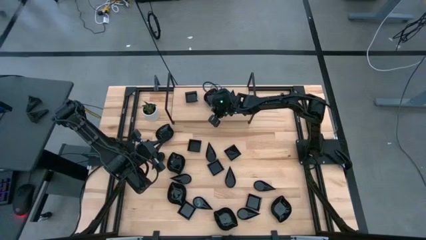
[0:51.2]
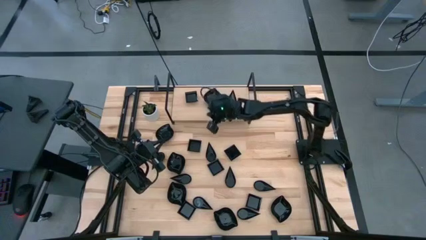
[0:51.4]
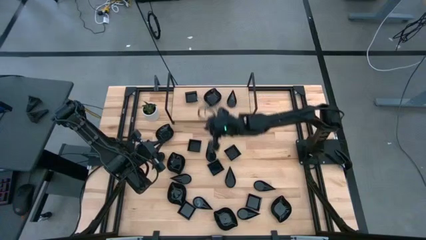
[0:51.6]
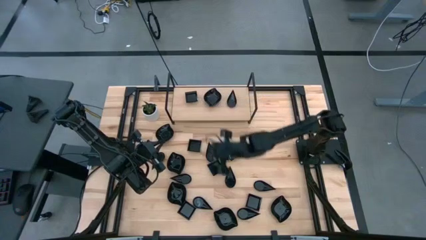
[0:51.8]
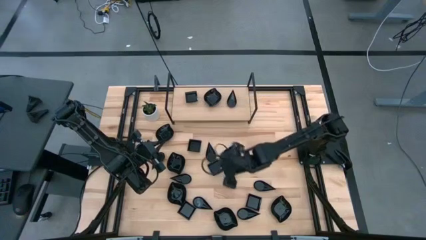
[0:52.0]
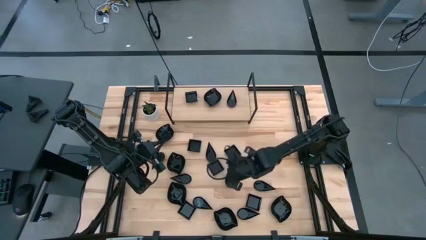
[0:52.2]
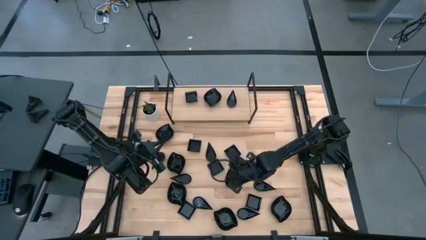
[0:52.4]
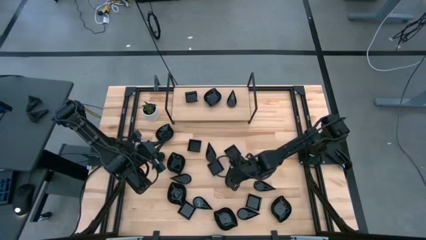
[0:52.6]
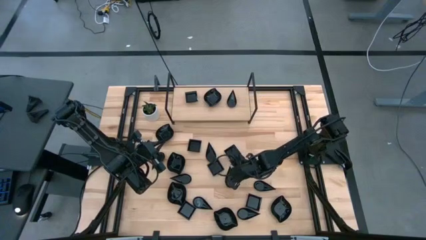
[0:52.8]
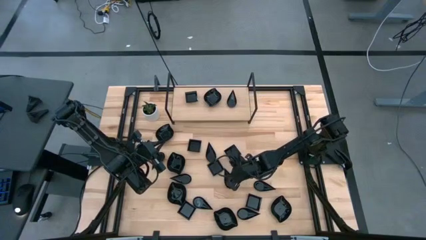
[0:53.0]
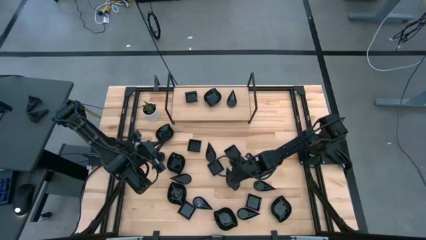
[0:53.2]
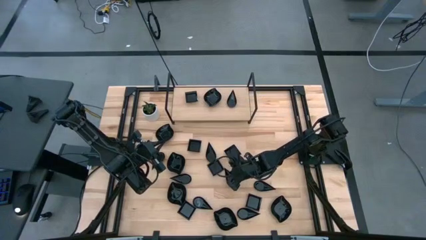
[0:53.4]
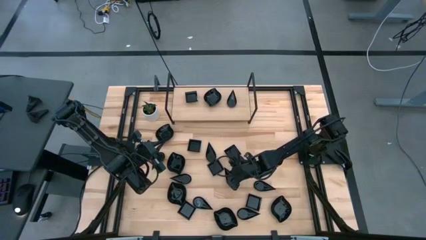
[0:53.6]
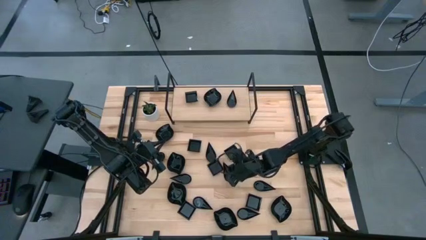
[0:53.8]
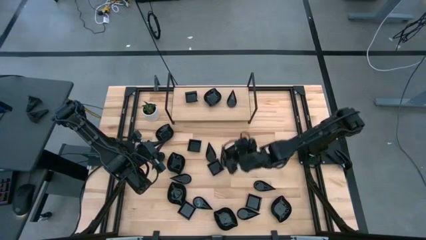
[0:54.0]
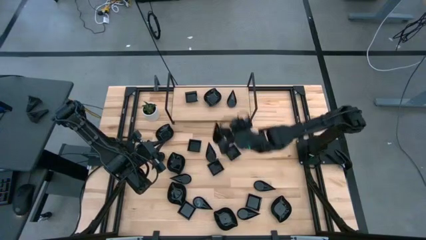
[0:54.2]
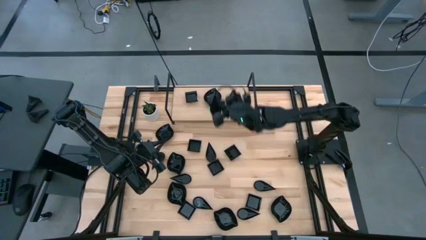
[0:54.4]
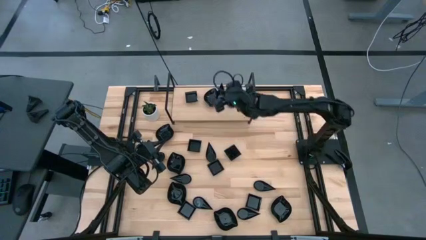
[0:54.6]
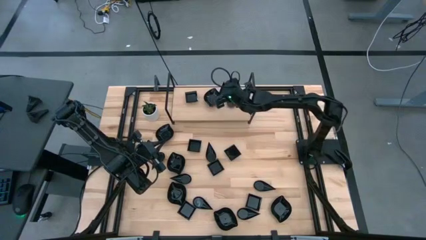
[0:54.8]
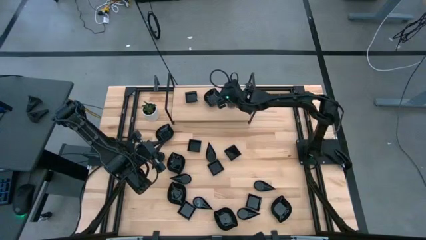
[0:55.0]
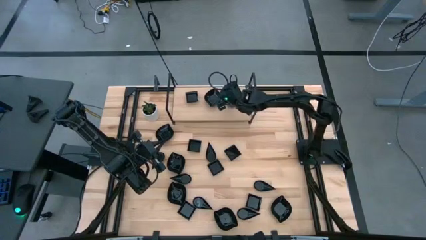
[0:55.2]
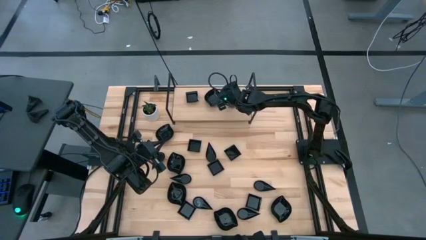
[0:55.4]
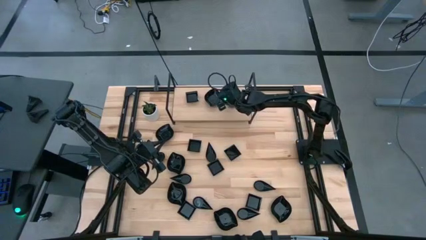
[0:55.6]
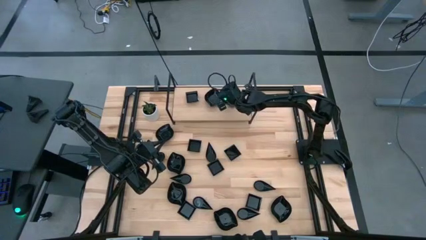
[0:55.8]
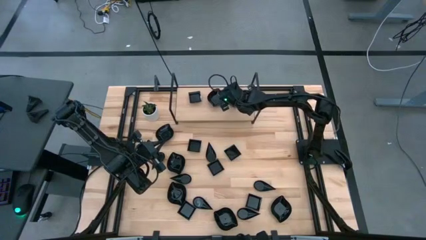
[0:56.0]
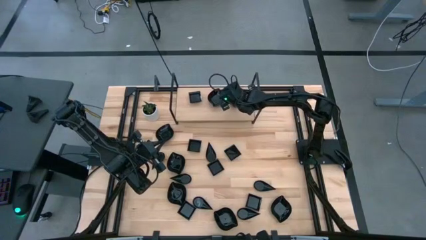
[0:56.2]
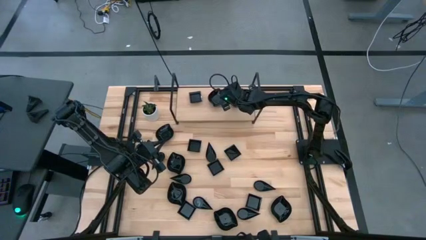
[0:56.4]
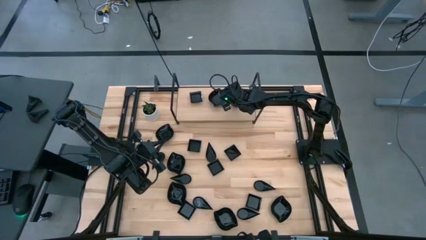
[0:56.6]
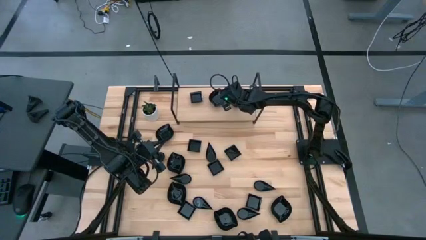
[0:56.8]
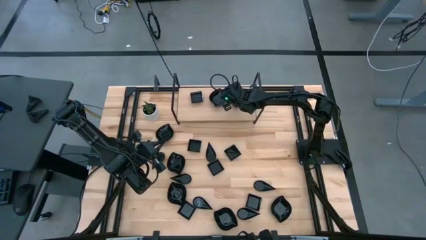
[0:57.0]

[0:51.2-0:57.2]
Task: Pick & Place Mini shaped plates
Stack the black teardrop shape bowl on top of the other black teardrop shape bowl on the shelf

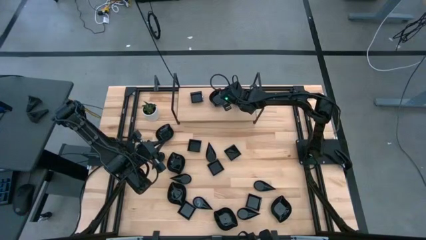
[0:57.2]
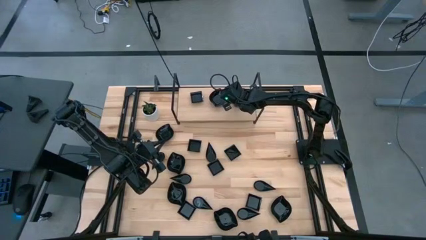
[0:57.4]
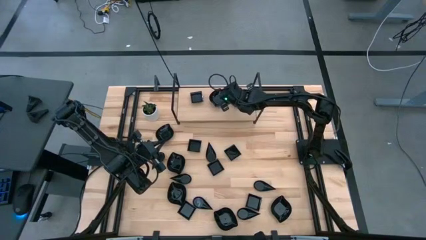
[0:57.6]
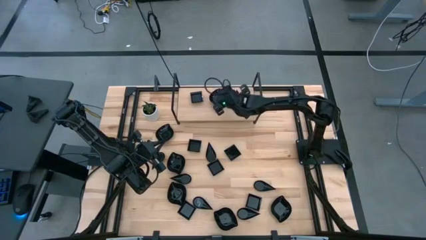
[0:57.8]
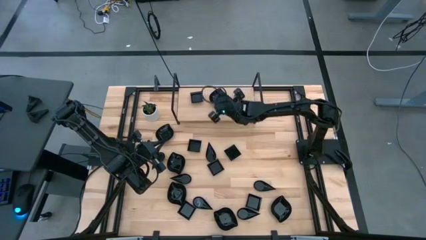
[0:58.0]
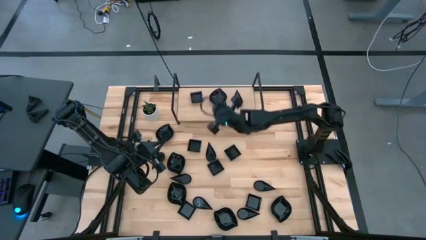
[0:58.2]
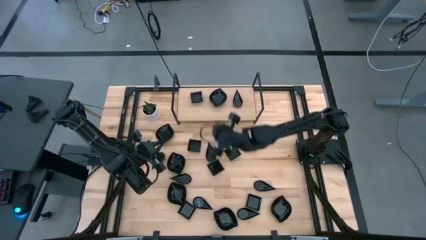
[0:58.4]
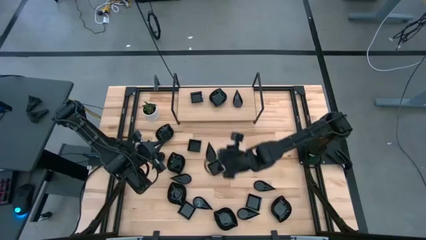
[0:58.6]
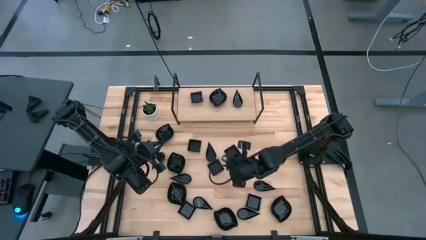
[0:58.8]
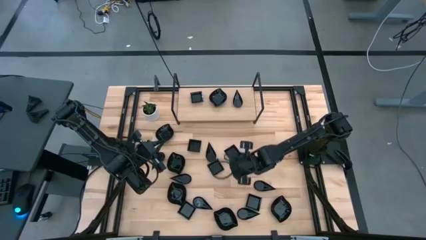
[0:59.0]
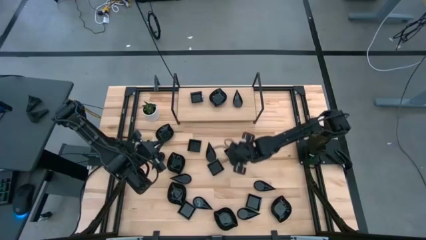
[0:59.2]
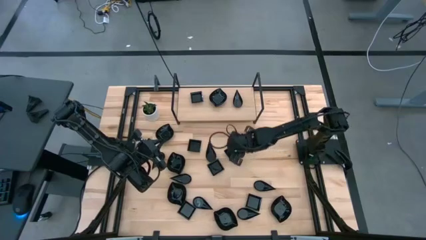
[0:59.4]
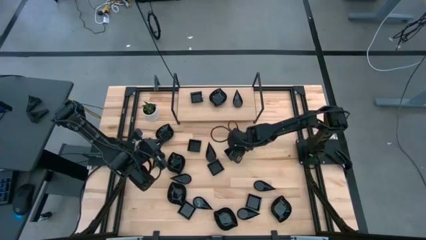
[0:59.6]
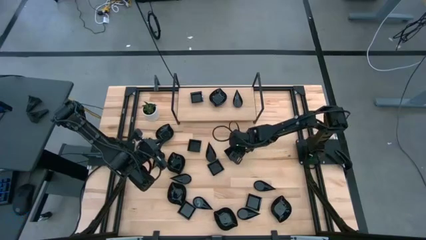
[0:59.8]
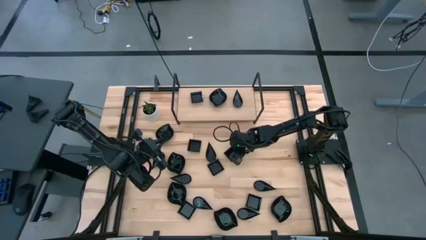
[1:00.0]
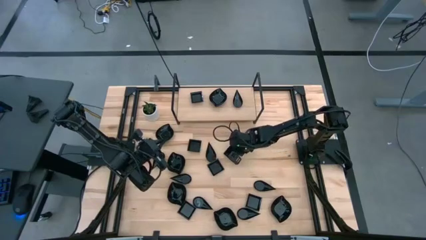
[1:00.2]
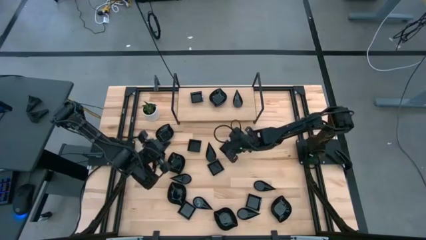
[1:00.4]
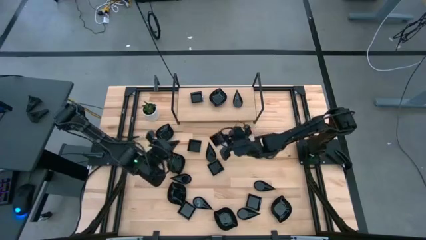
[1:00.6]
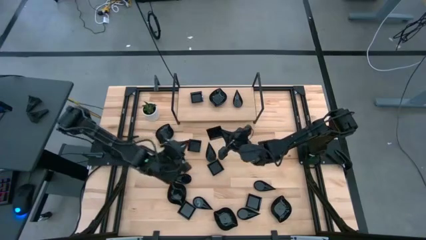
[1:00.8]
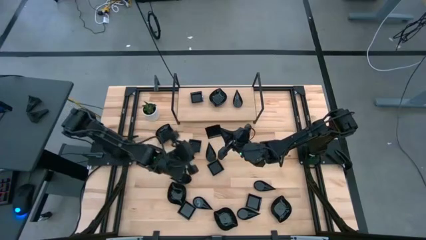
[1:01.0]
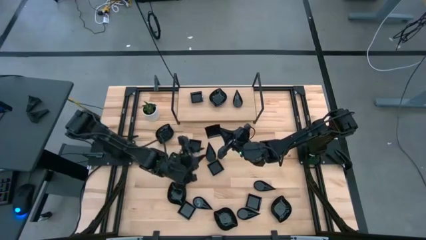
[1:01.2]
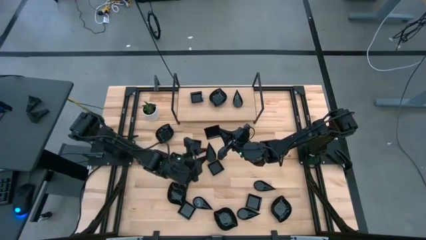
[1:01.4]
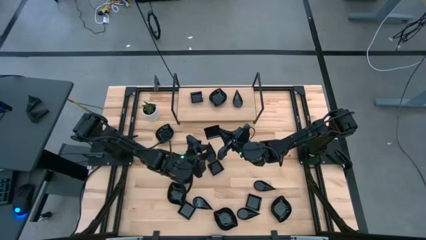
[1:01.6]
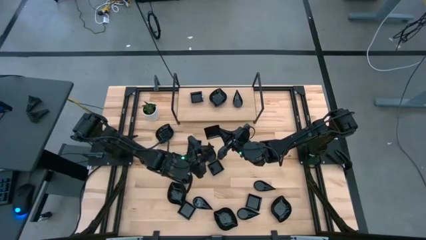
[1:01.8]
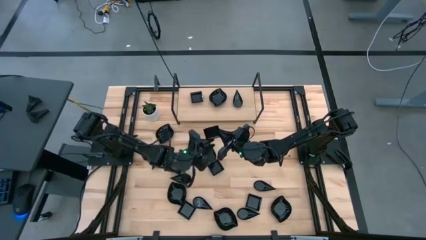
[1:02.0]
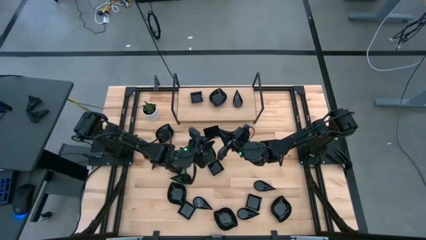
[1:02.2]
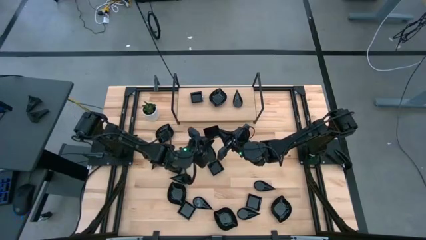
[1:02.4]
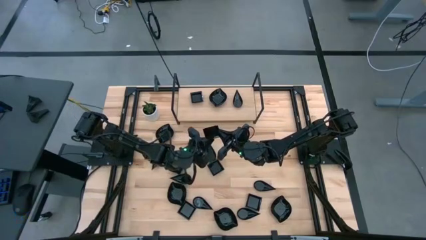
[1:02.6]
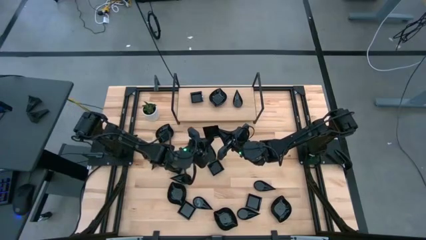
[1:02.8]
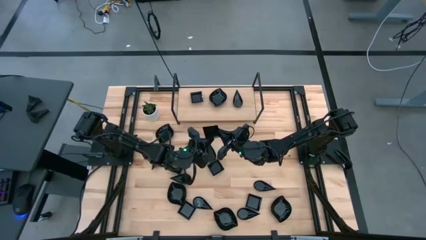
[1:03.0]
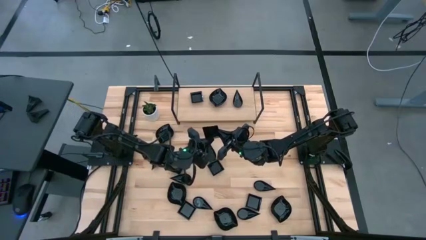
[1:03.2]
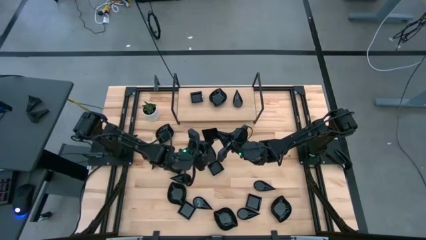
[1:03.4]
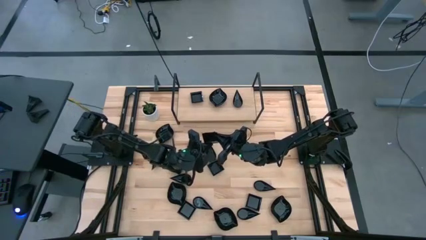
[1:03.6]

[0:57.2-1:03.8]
Stack the black square bowl on top of the other black square bowl on the shelf

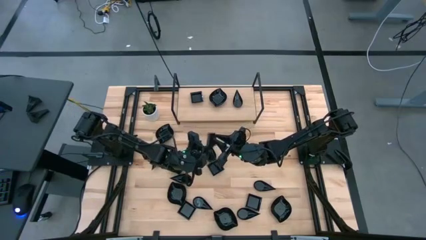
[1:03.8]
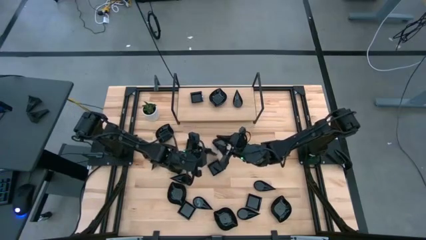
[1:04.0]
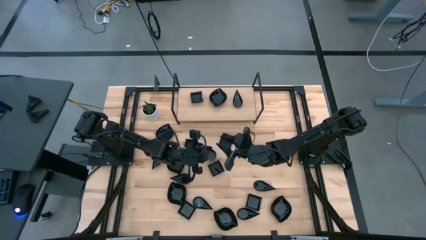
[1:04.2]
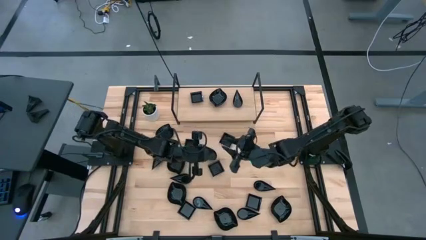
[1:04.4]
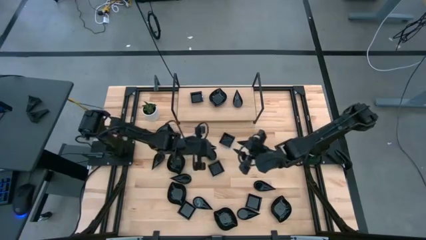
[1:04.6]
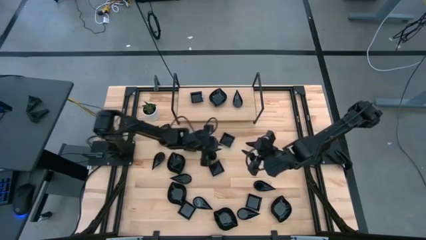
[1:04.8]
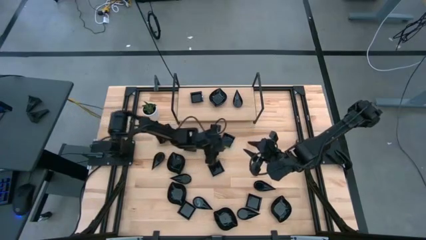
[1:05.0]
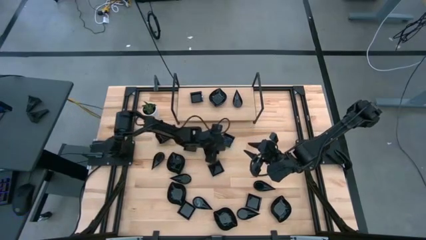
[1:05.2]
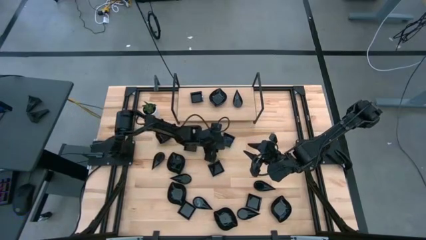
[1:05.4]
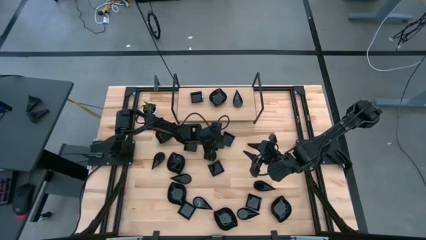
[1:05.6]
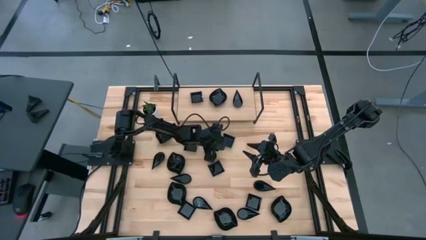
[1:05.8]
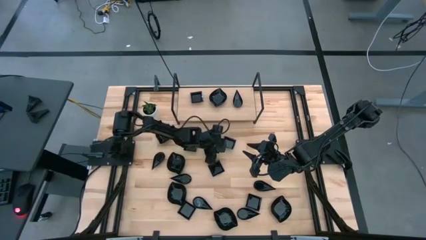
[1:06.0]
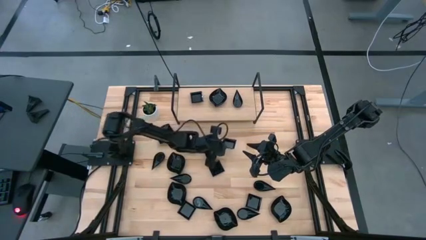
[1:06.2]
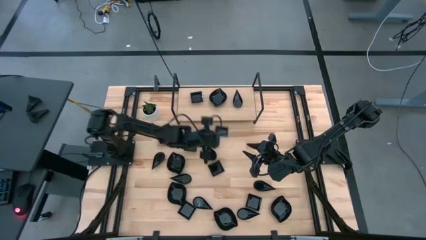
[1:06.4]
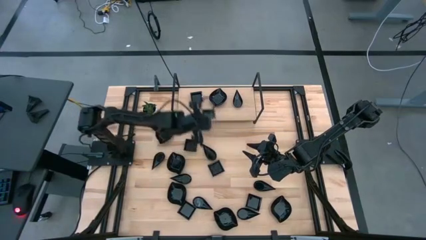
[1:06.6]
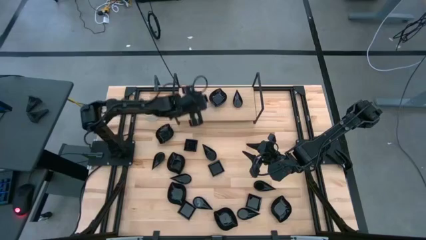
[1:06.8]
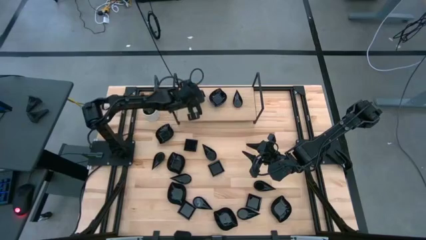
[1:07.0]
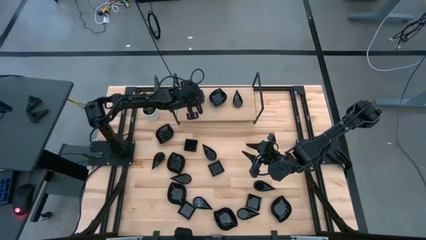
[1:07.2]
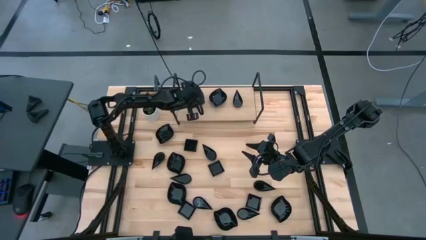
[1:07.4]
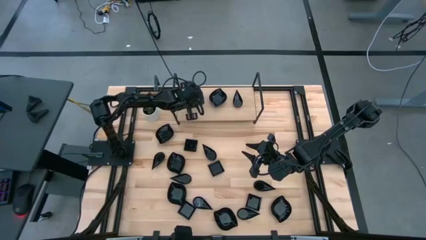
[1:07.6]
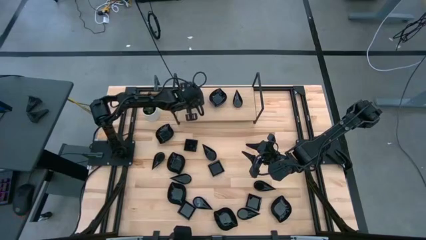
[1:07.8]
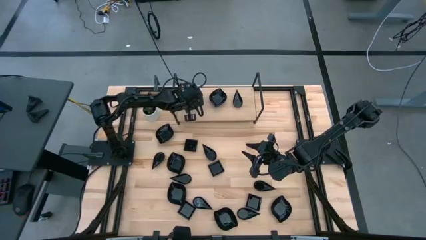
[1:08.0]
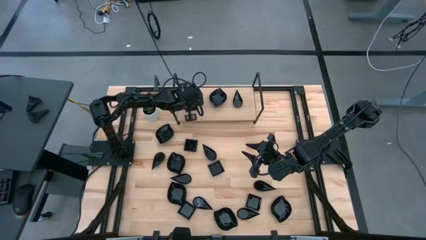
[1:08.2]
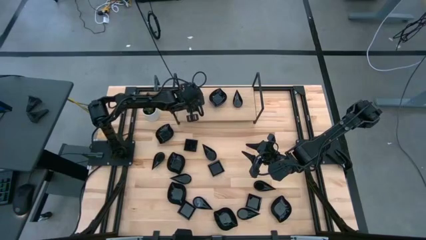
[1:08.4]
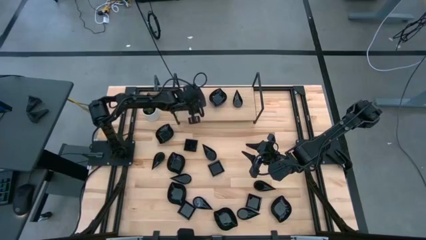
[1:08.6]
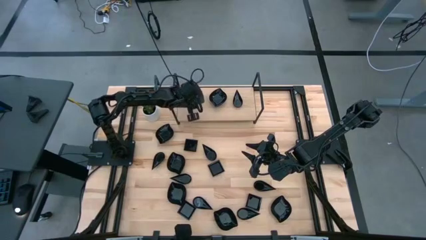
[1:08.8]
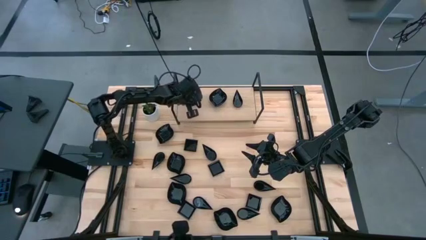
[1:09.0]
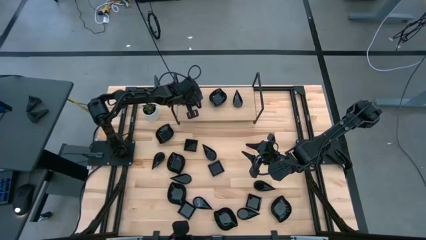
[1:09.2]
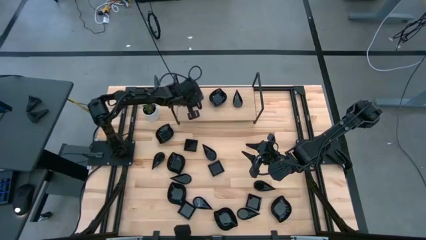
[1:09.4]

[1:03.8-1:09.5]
Stack the black square bowl on top of the other black square bowl on the shelf
